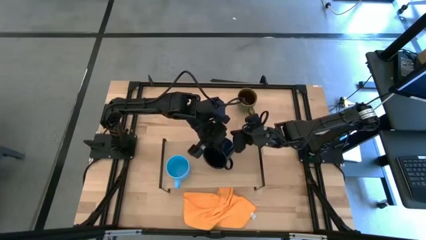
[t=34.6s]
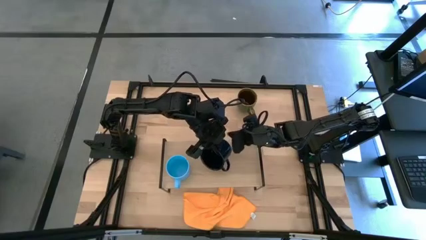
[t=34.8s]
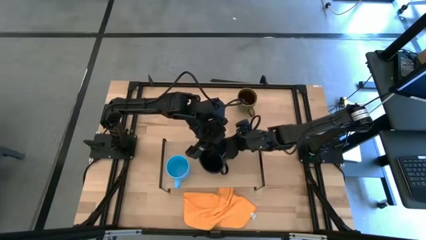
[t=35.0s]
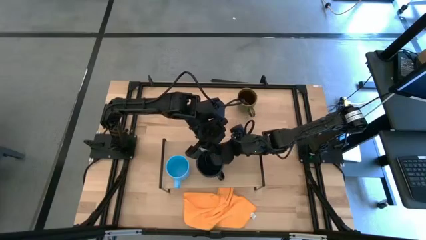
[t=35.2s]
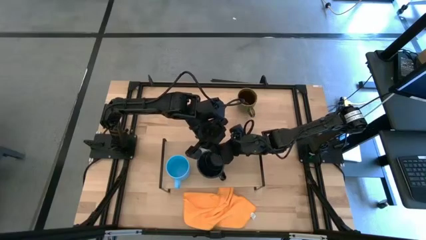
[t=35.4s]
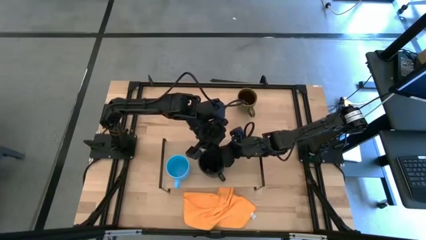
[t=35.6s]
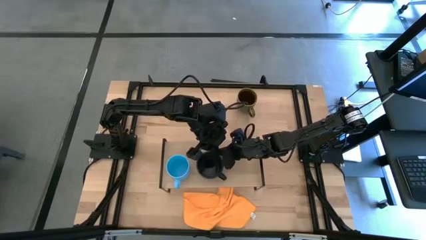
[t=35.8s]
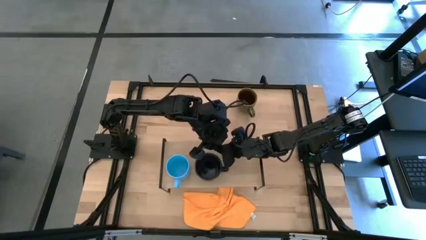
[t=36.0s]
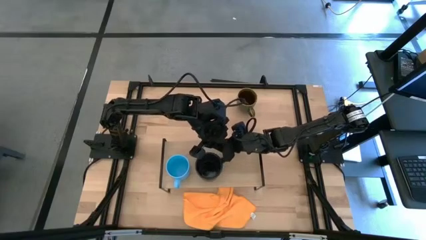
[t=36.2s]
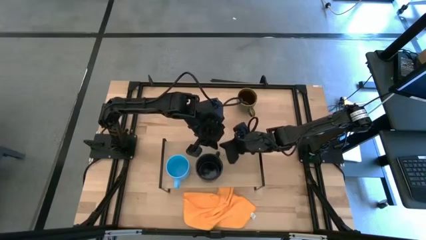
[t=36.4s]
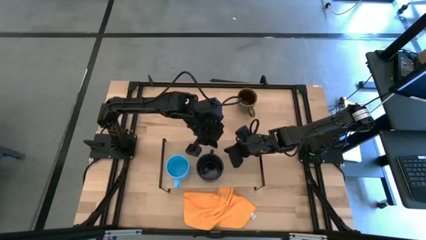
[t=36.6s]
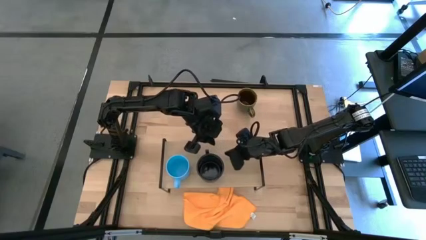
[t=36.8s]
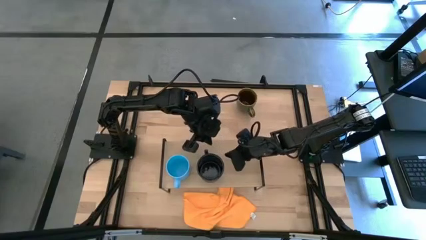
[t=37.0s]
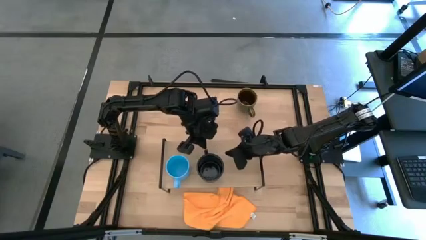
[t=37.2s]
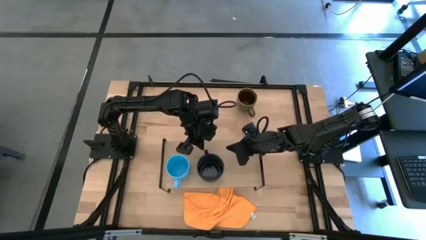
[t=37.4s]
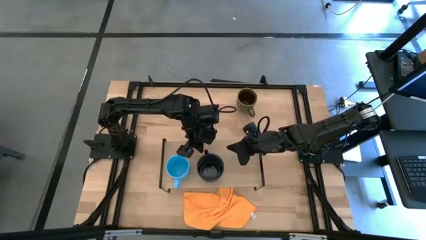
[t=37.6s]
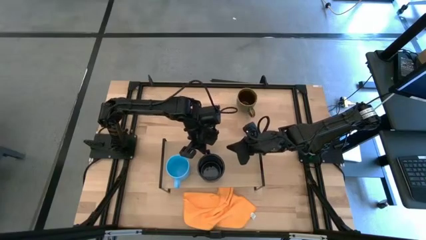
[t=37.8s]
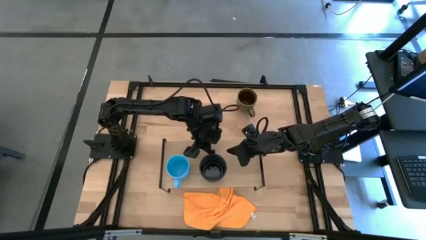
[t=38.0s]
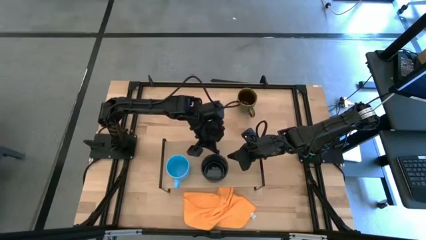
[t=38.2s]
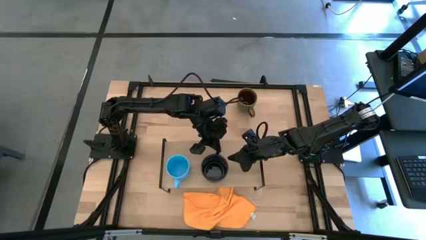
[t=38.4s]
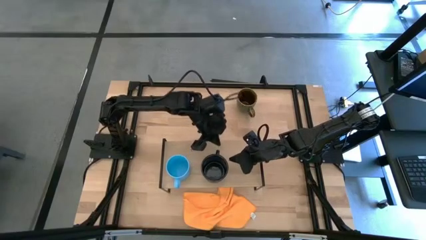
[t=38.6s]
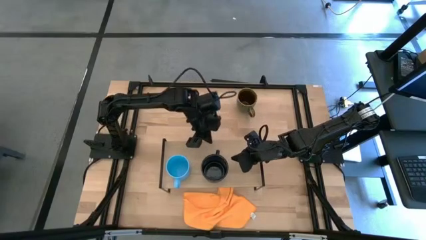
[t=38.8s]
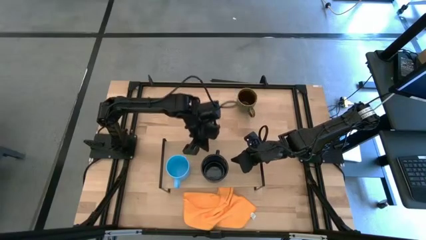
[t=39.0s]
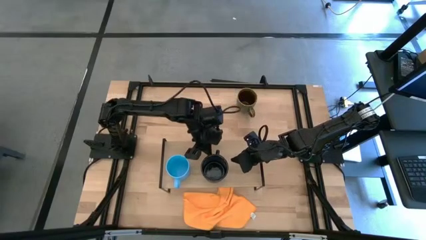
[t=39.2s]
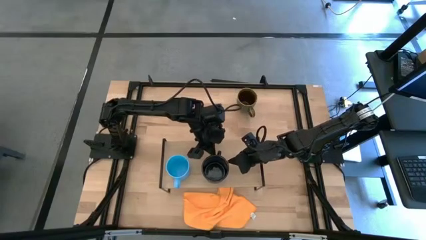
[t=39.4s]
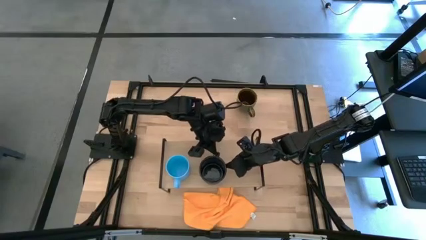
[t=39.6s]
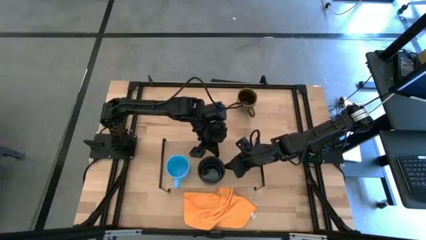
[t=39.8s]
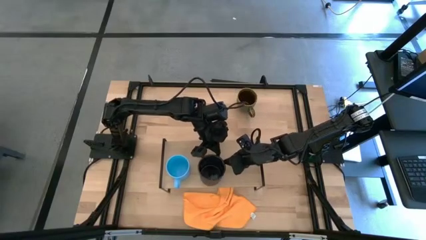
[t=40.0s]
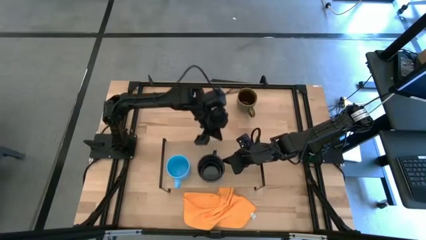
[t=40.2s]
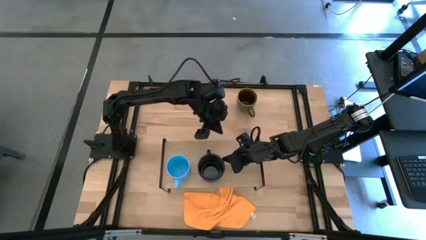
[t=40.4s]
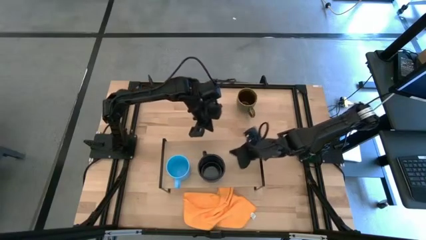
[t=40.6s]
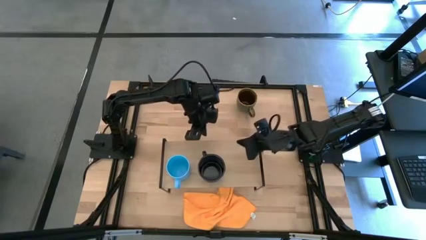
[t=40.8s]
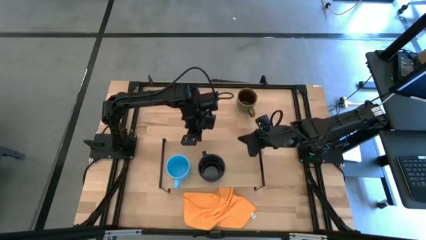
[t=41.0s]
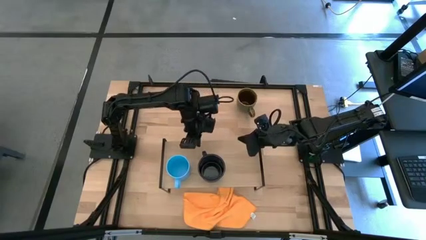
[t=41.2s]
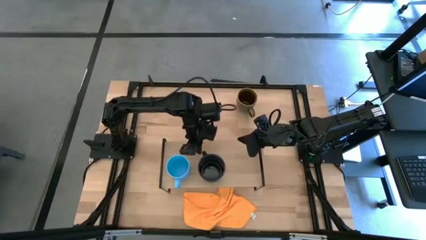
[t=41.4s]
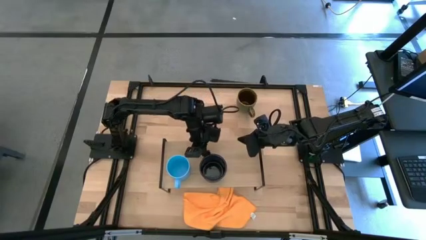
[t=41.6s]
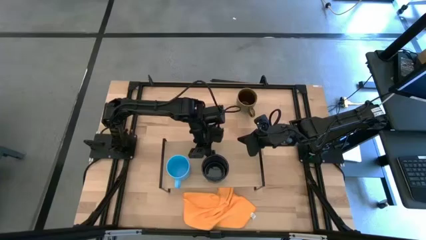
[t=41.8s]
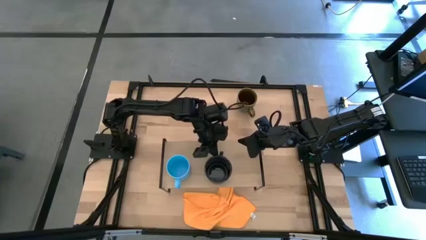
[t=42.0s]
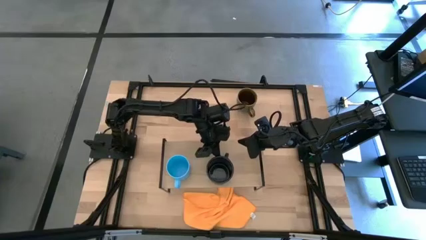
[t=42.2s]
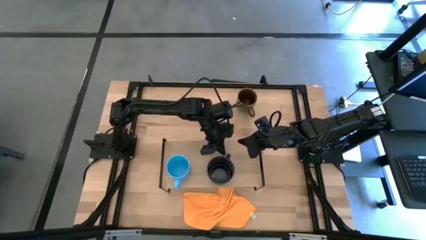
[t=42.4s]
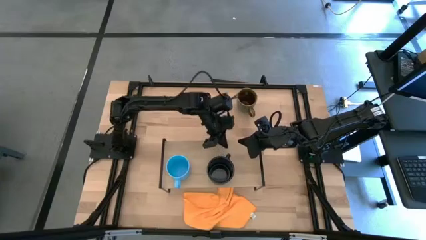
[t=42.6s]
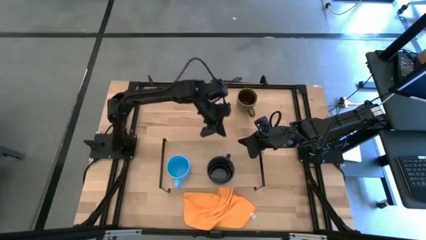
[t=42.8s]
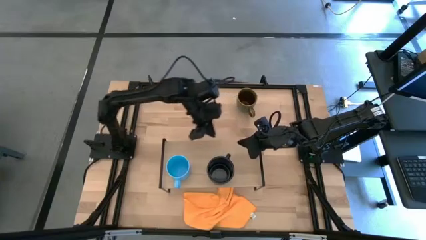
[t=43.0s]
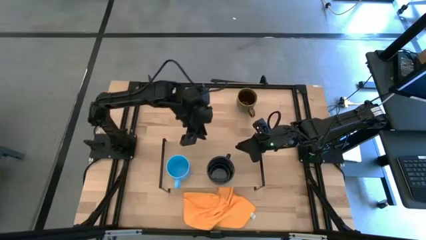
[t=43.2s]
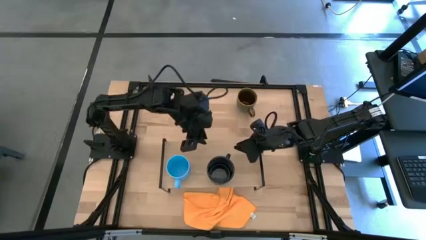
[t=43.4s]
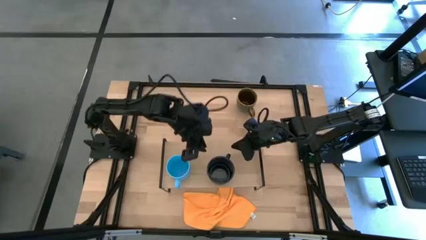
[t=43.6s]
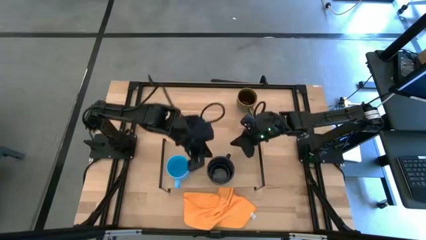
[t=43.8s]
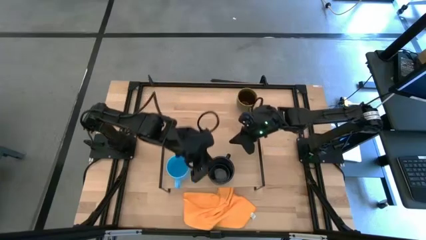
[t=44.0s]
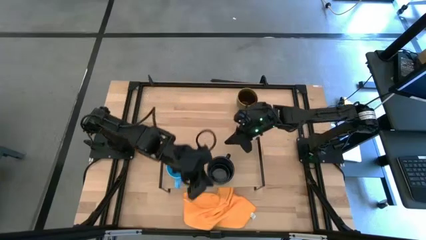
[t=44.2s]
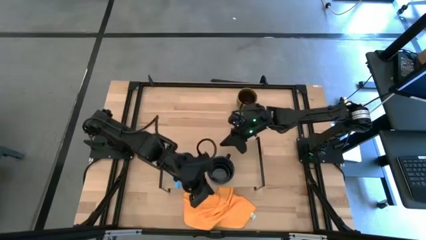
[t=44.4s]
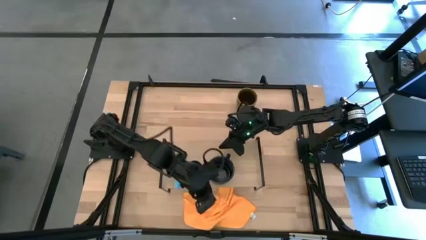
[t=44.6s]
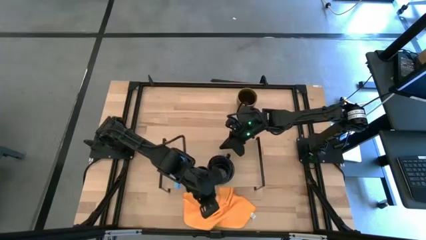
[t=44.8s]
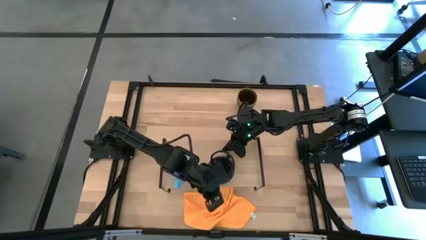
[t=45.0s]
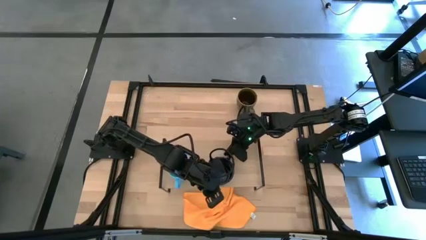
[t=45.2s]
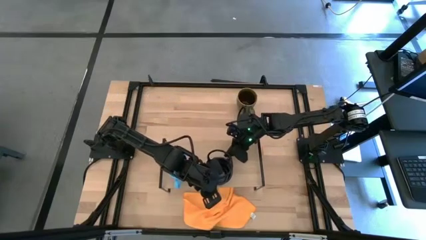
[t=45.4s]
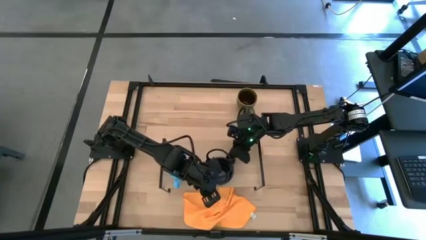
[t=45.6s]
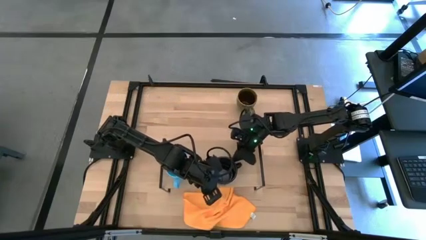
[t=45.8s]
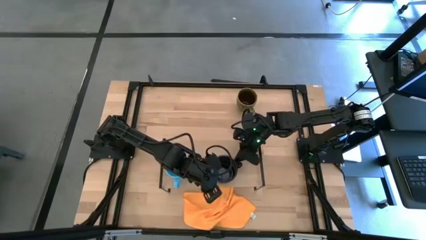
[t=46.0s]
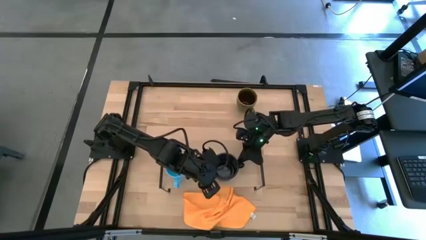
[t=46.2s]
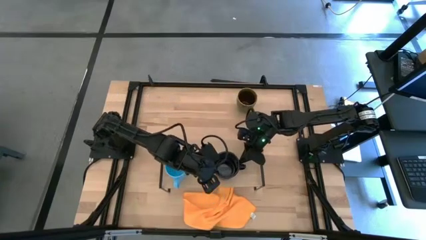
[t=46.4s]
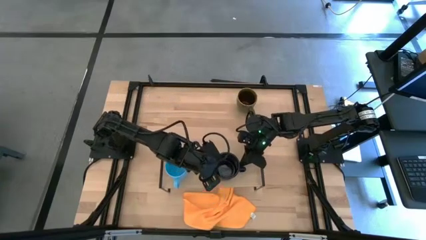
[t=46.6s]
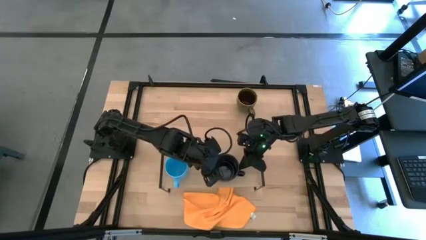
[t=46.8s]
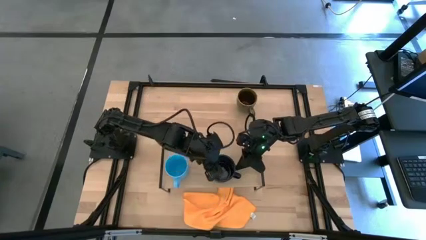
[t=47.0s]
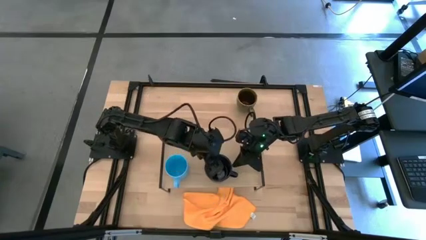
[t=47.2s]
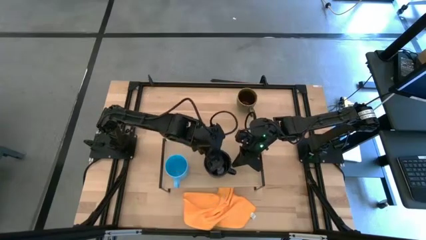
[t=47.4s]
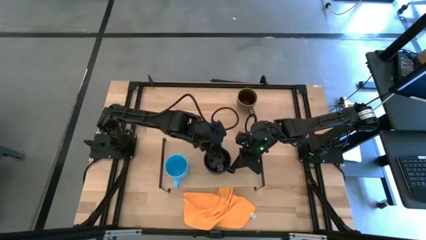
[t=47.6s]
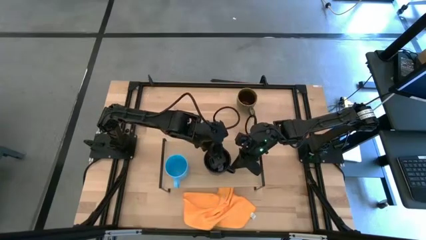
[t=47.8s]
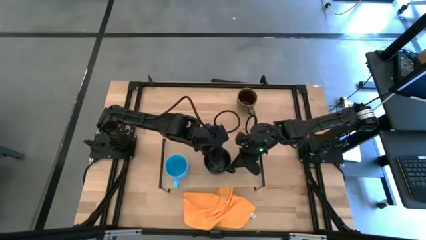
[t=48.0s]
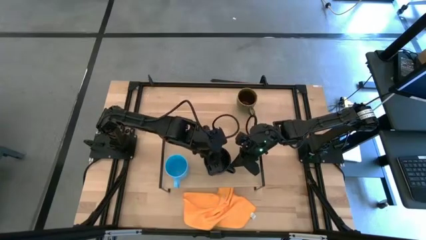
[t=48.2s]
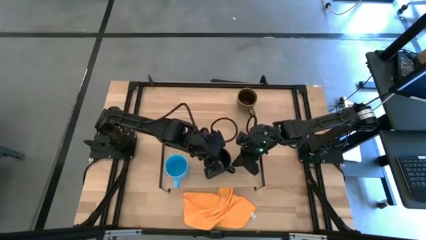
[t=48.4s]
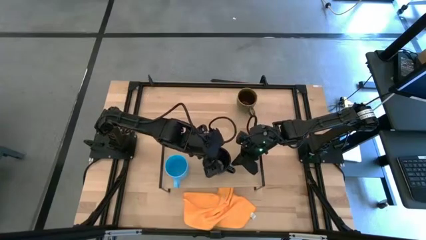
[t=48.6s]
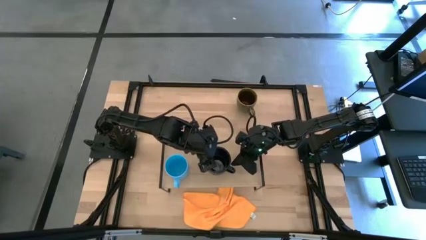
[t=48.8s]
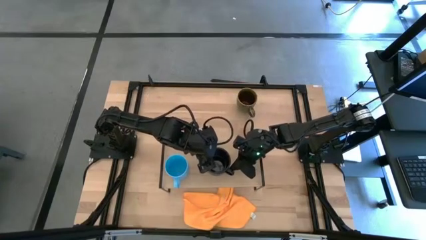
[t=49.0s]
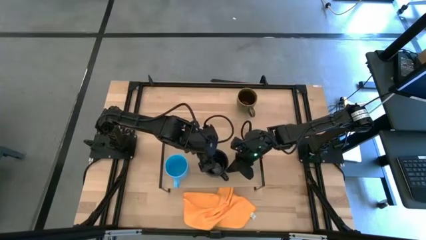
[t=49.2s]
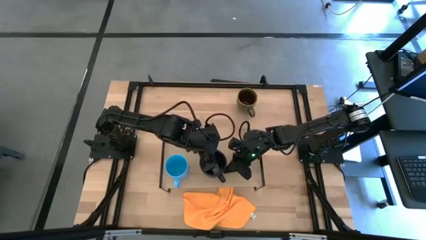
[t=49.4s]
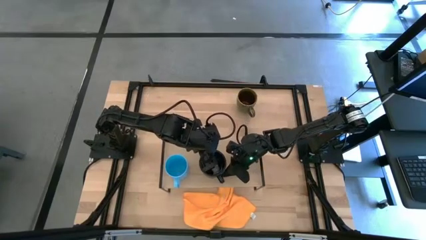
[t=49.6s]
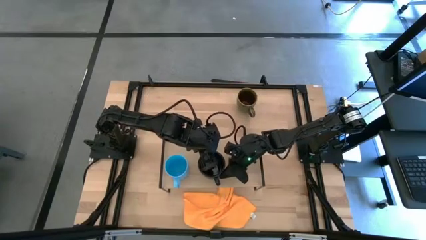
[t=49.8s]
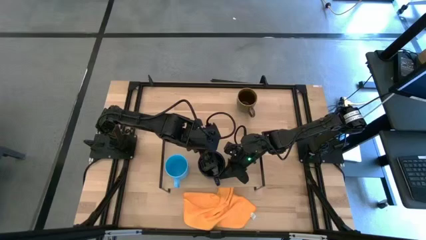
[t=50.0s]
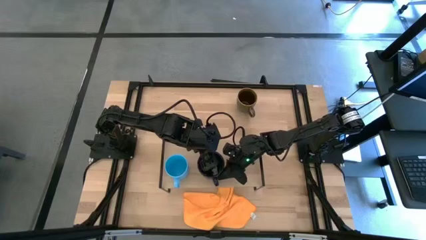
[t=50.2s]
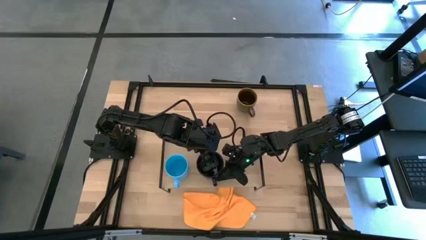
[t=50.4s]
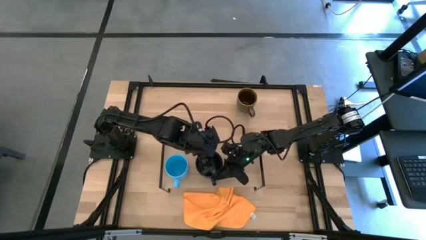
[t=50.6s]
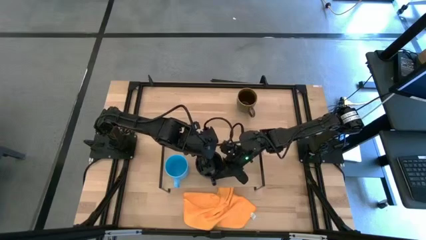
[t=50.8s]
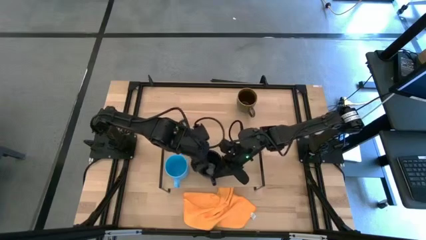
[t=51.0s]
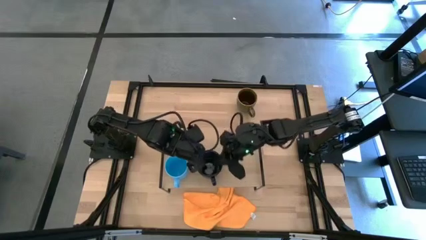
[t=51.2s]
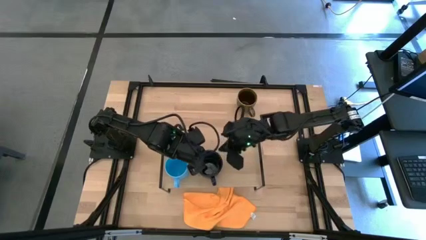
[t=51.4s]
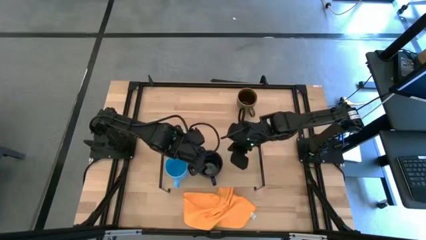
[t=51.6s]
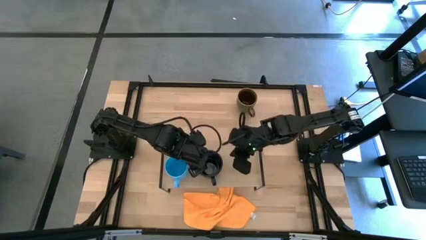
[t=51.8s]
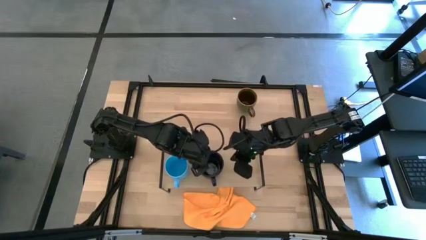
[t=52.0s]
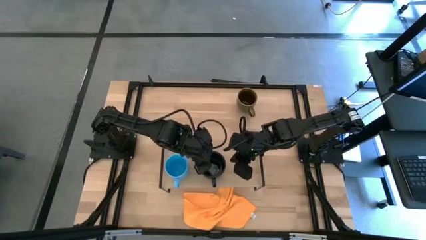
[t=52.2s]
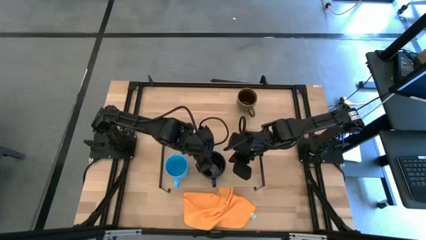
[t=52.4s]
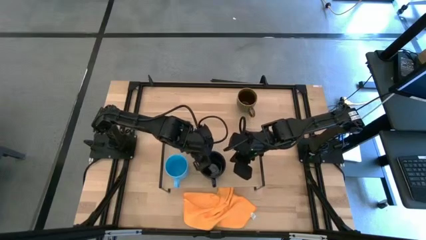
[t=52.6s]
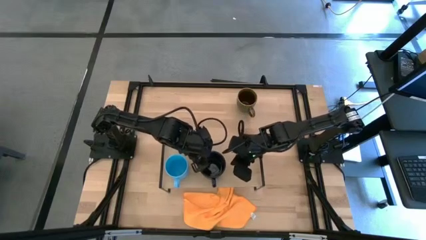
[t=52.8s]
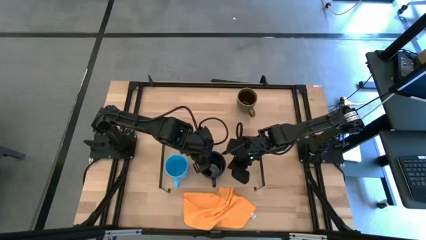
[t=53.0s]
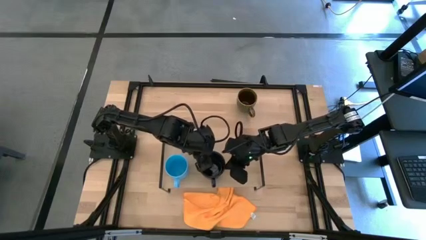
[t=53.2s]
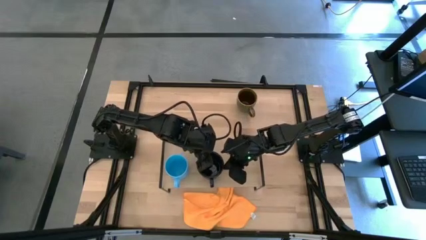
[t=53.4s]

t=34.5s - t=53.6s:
Task: Stack small to large cups/mugs on shelf
Put the dark blue mug on the shelf
